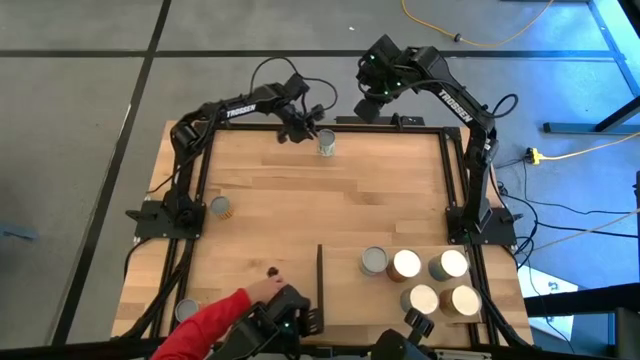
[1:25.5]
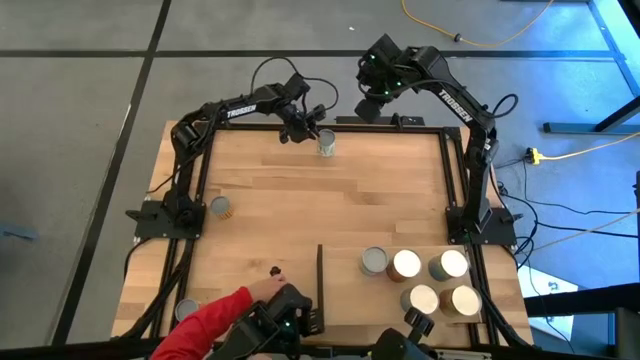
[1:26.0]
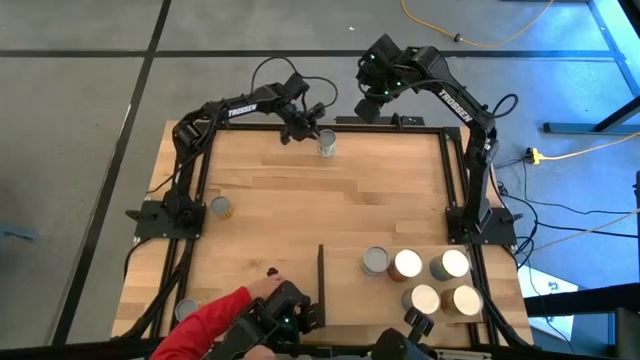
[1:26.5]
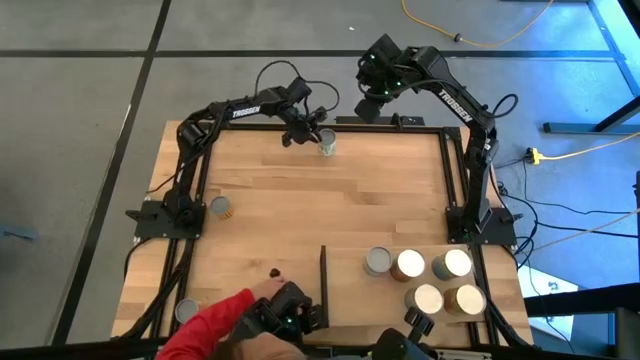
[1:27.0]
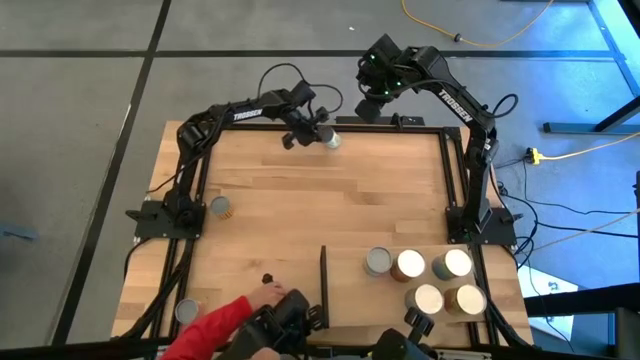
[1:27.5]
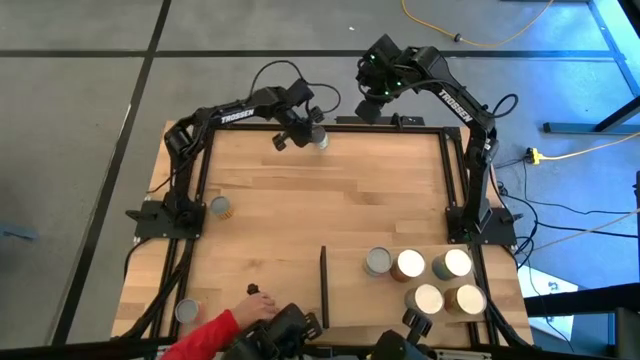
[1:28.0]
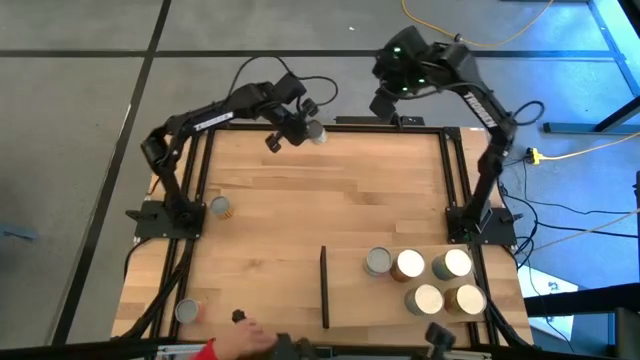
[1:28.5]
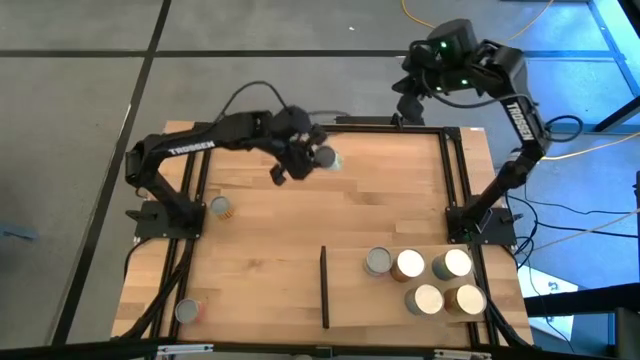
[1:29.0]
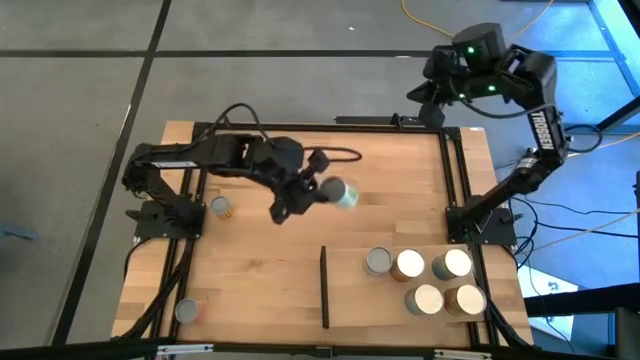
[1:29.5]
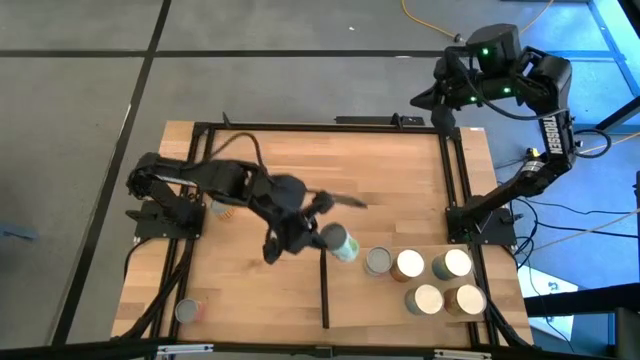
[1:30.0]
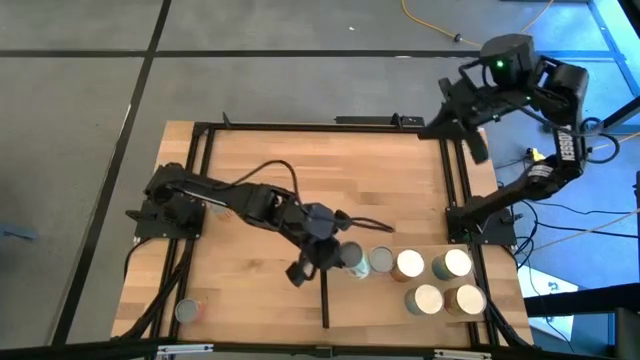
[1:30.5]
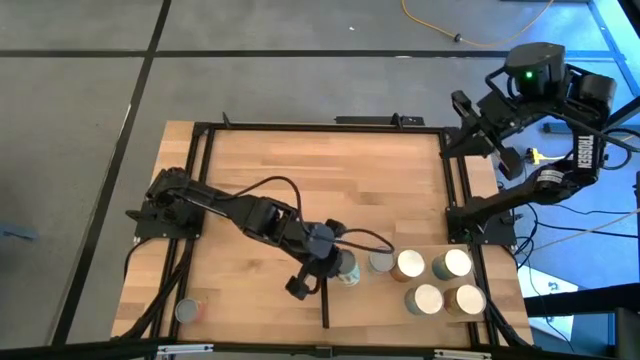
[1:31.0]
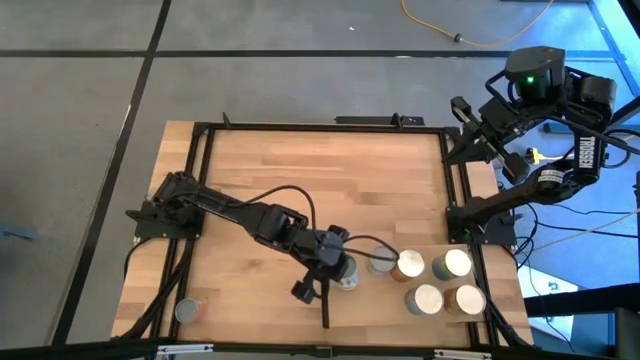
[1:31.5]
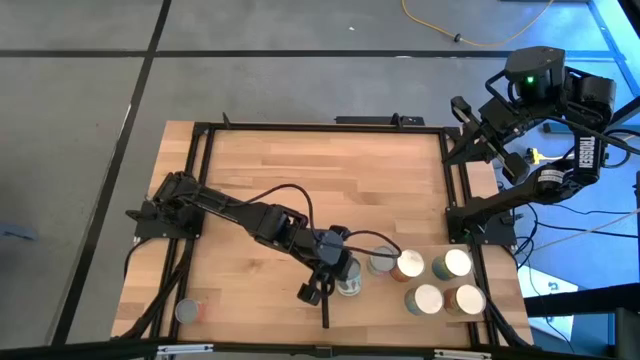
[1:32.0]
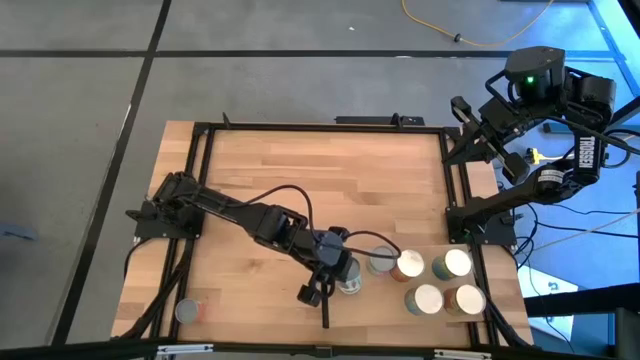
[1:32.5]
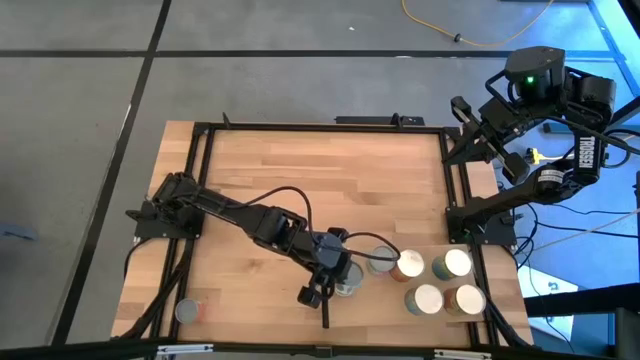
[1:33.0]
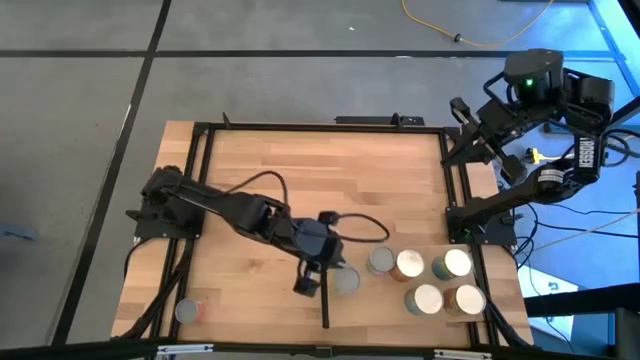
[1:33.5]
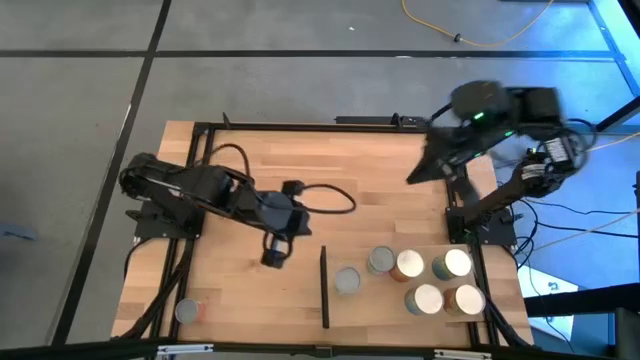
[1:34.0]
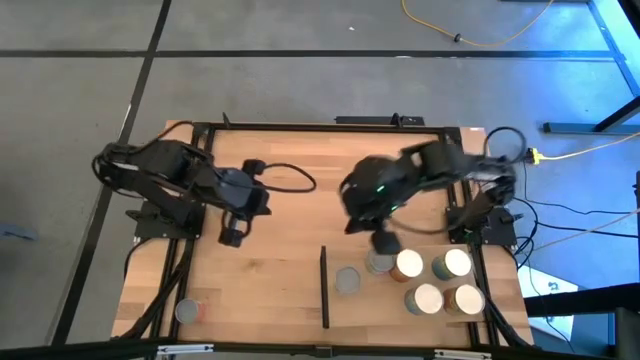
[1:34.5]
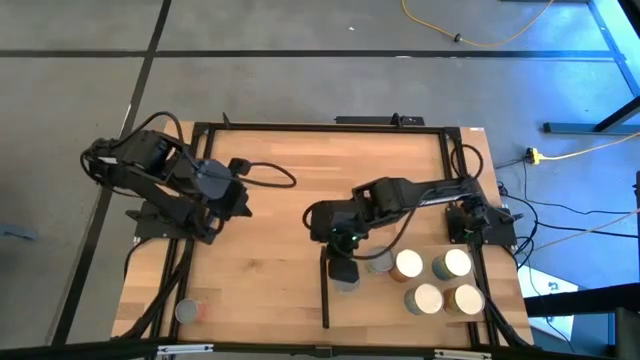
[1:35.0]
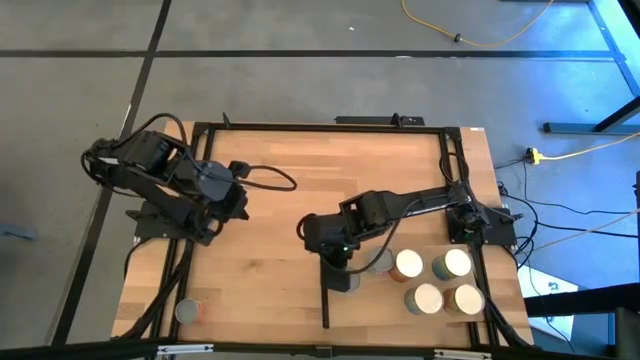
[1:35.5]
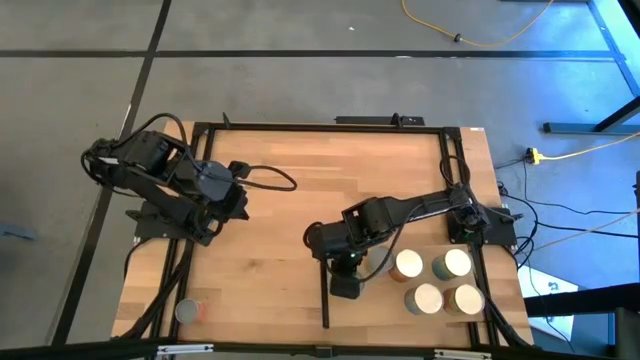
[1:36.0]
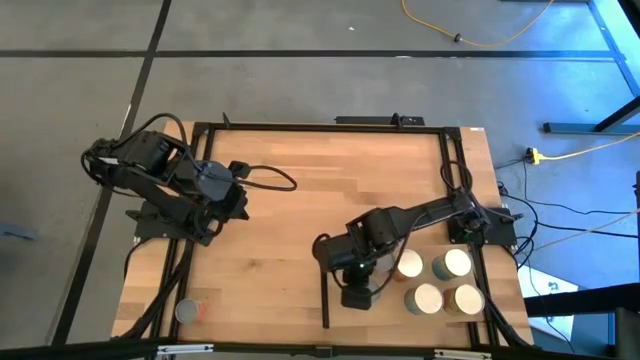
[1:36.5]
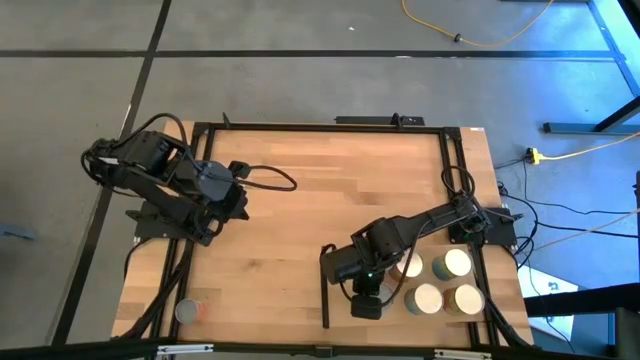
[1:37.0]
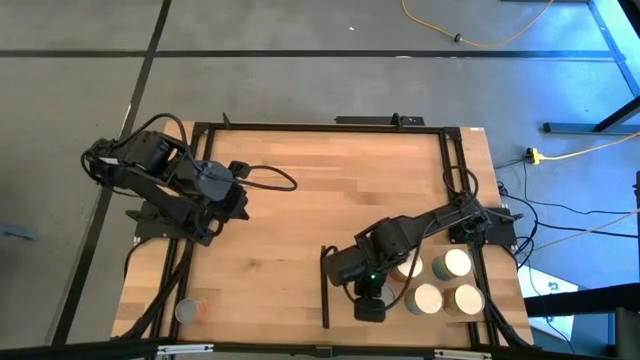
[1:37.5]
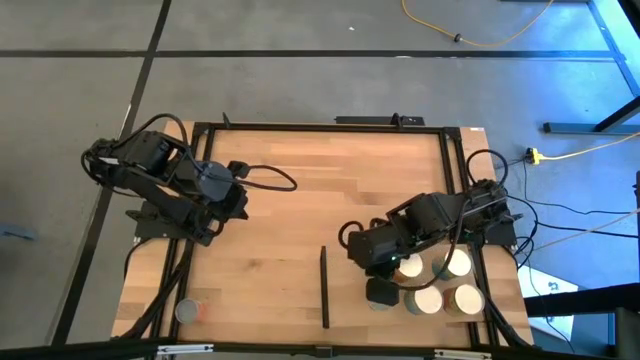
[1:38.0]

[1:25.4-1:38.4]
Task: Pick and place cans onto a shelf
Put the canned mixed vegetables on the shelf

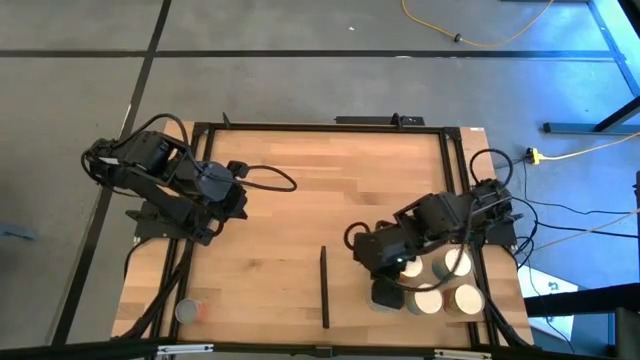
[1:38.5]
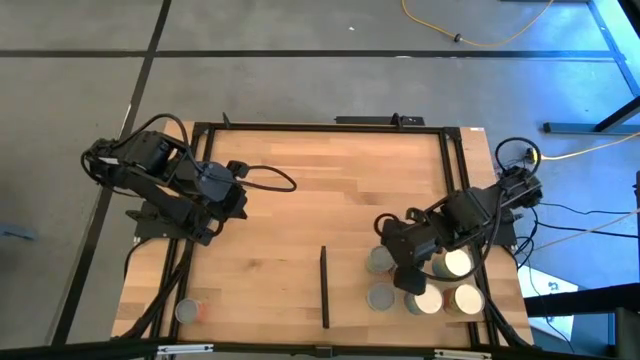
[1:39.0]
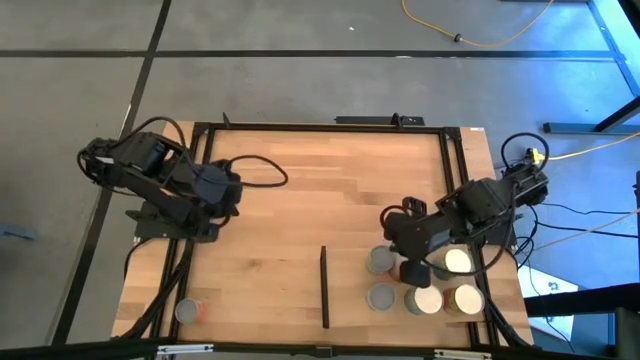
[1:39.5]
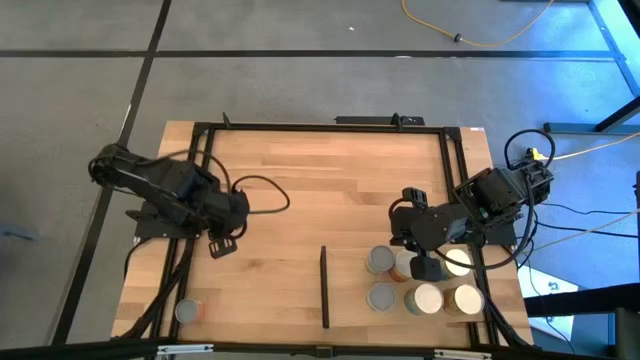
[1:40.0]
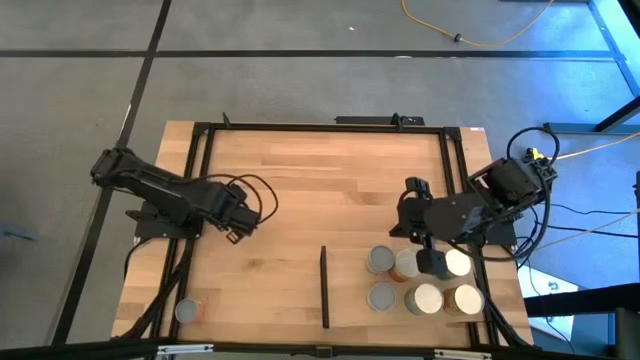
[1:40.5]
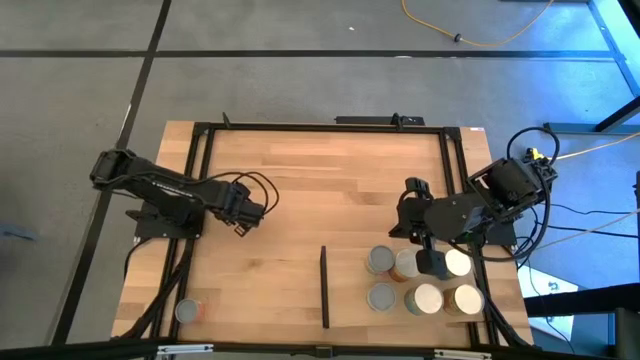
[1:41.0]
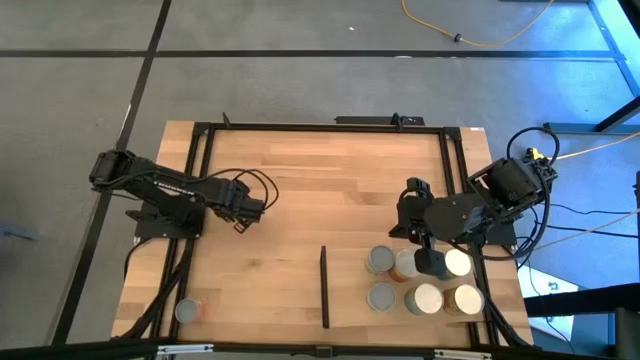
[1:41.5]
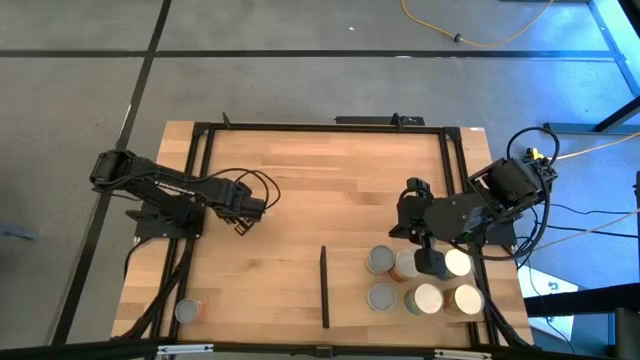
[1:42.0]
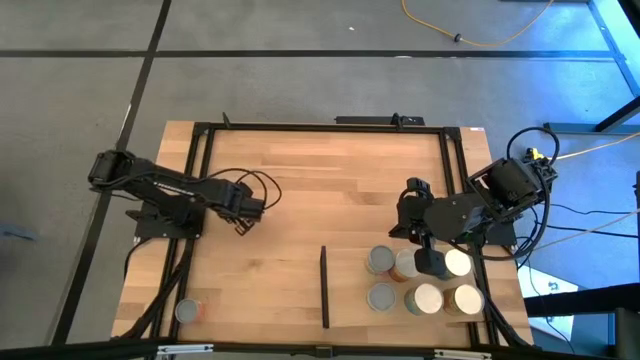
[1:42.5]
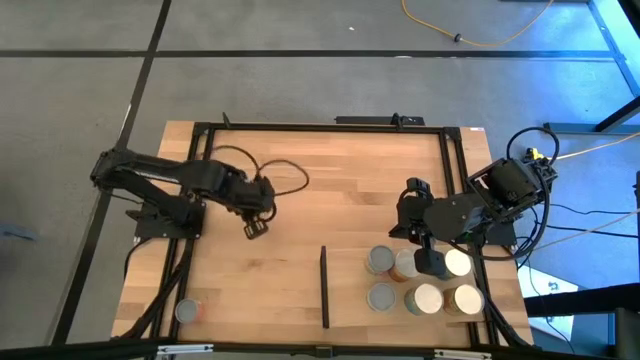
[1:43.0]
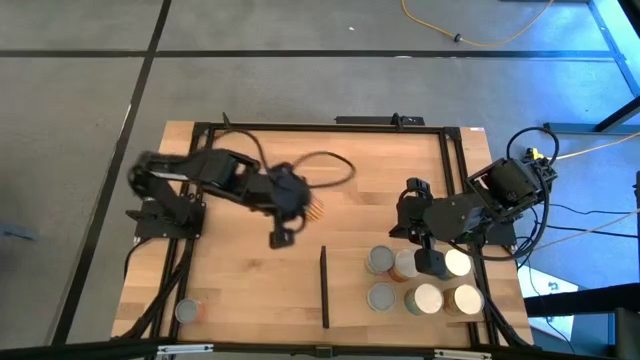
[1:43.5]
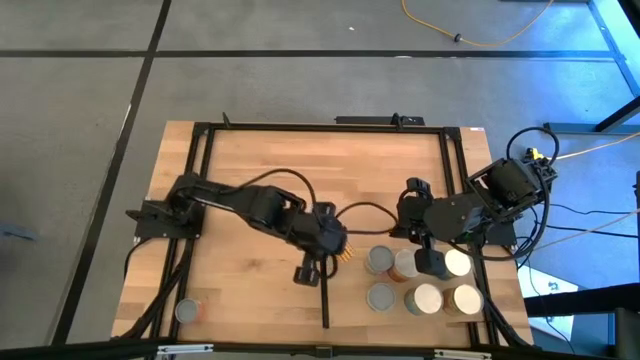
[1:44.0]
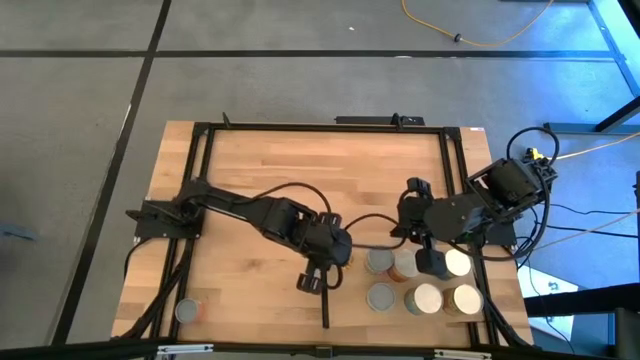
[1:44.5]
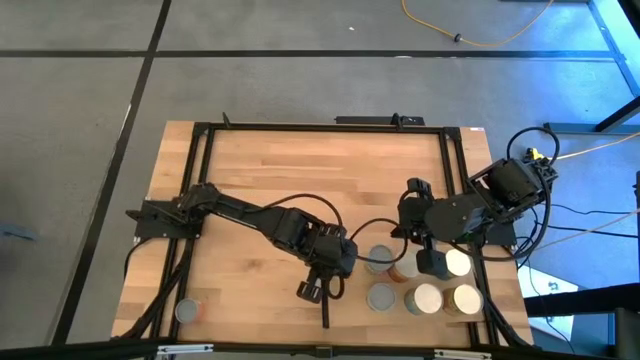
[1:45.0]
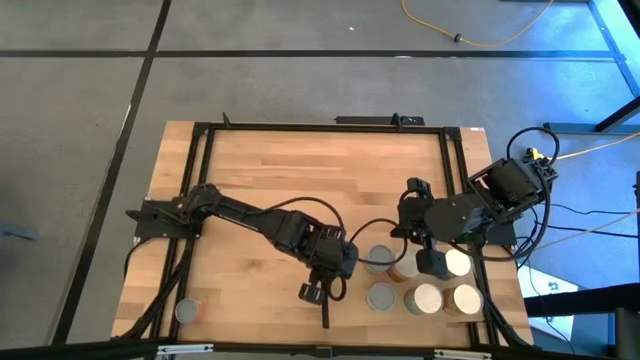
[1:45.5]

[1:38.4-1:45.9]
Put the canned spices on the shelf

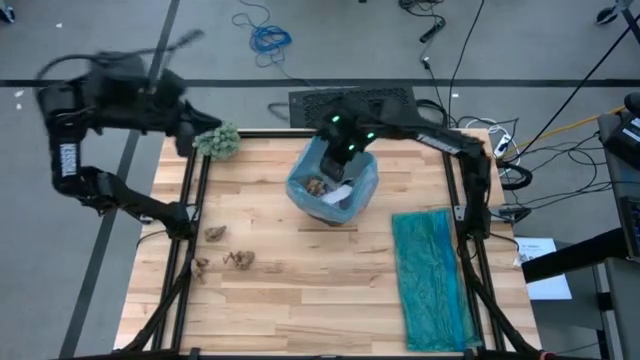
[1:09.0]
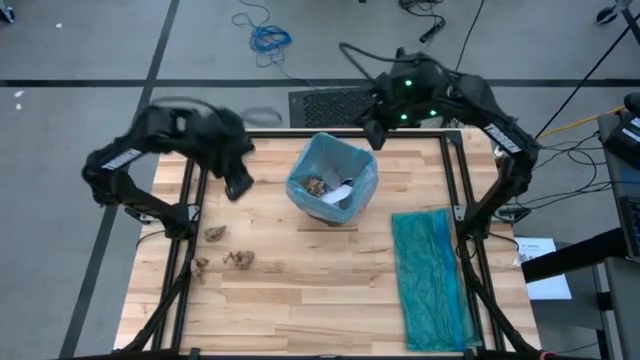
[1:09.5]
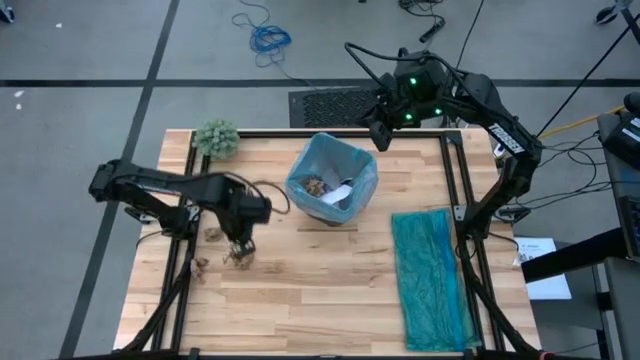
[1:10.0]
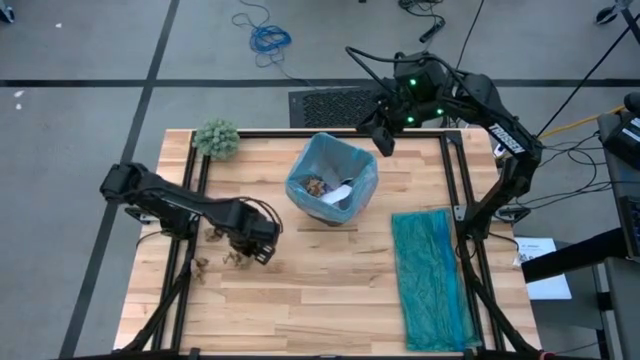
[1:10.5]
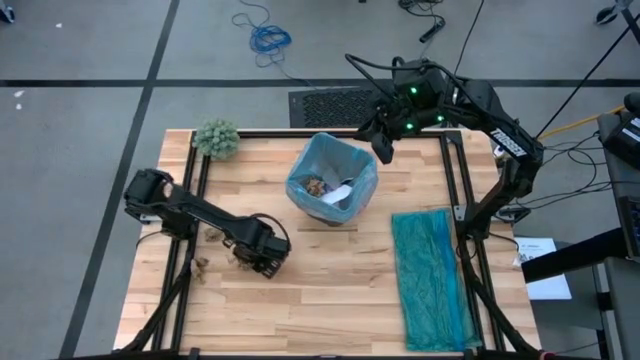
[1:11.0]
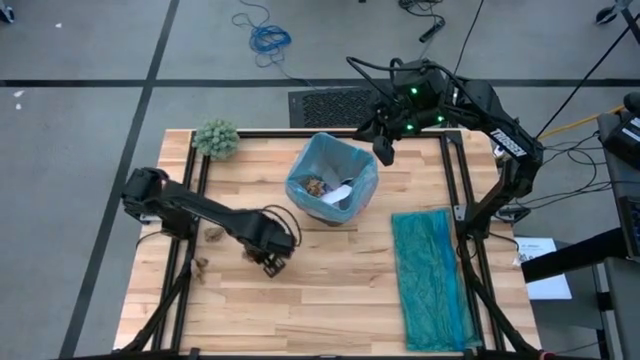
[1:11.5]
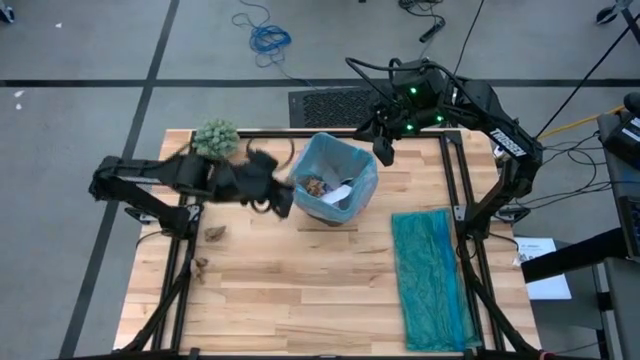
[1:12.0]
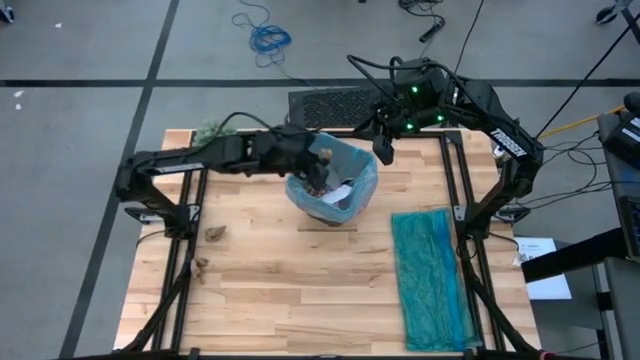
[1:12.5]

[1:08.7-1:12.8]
Task: place trash/remove bag and relplace
Put the brown paper into the trash bin
